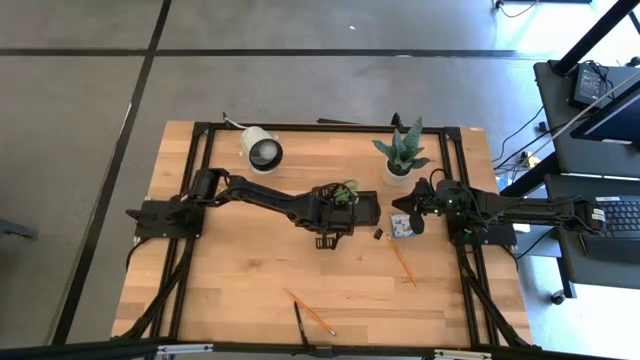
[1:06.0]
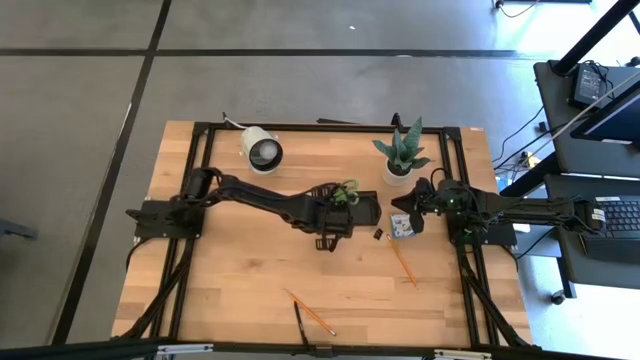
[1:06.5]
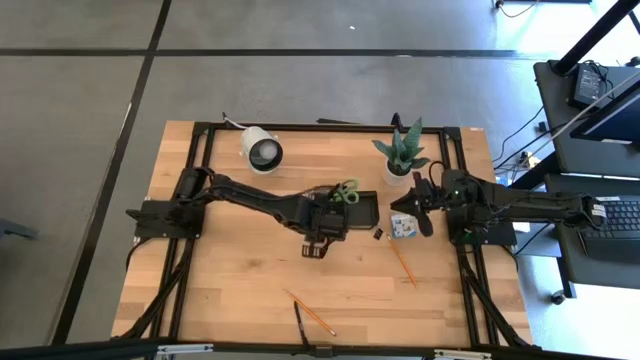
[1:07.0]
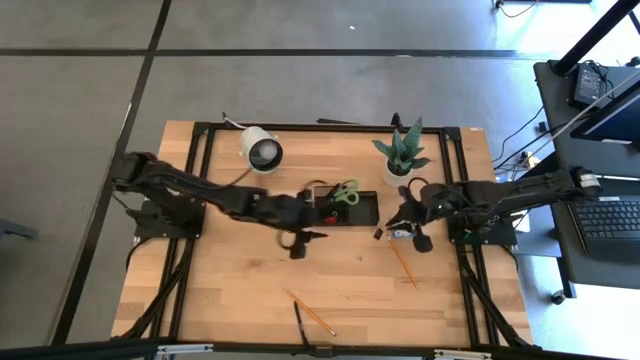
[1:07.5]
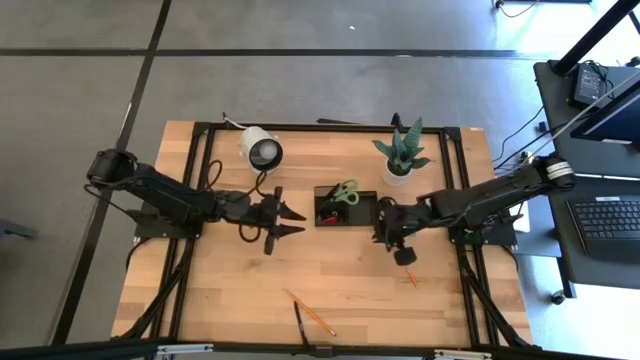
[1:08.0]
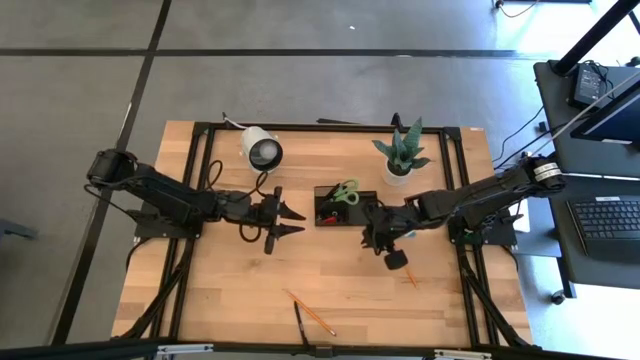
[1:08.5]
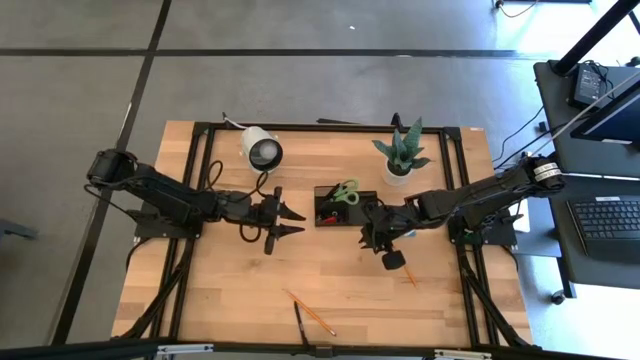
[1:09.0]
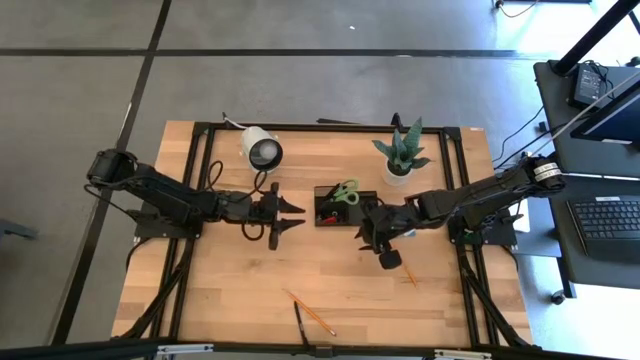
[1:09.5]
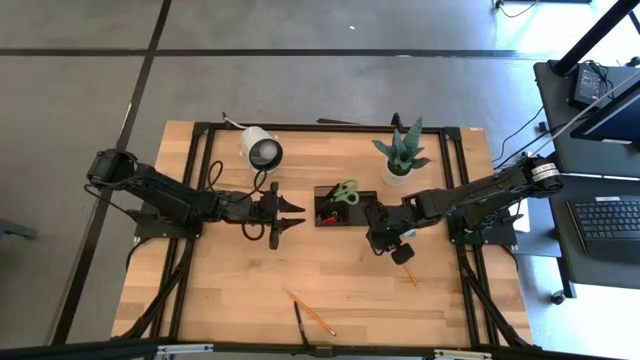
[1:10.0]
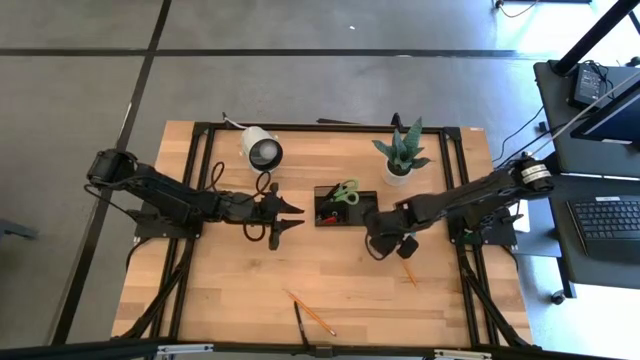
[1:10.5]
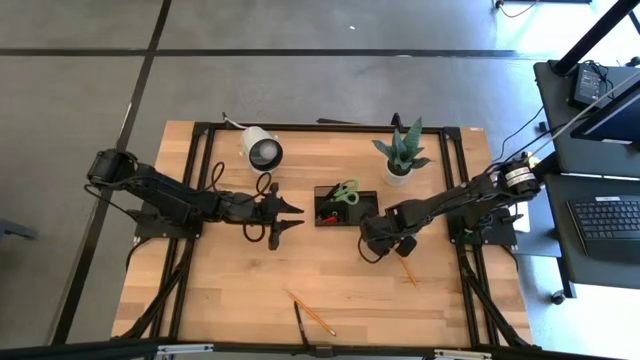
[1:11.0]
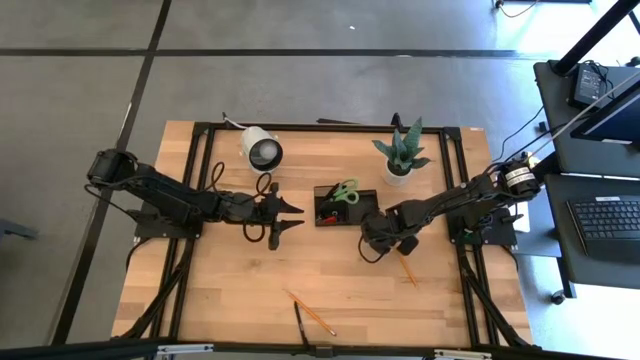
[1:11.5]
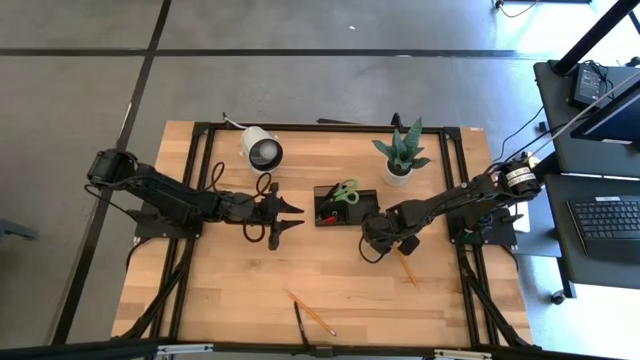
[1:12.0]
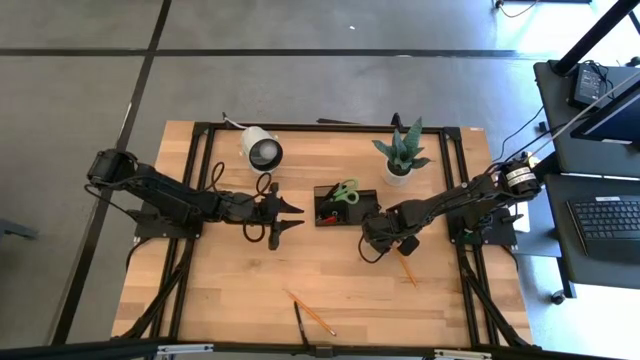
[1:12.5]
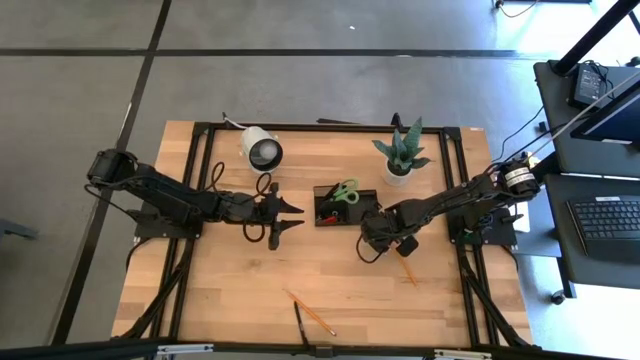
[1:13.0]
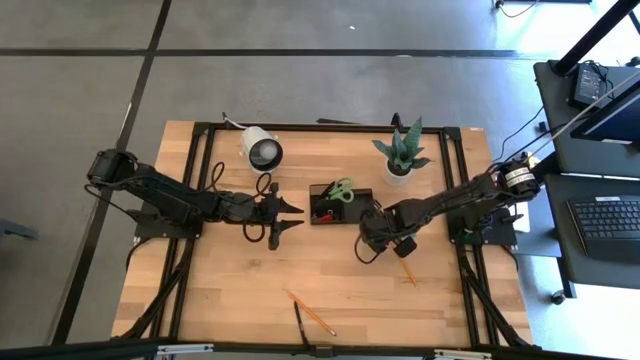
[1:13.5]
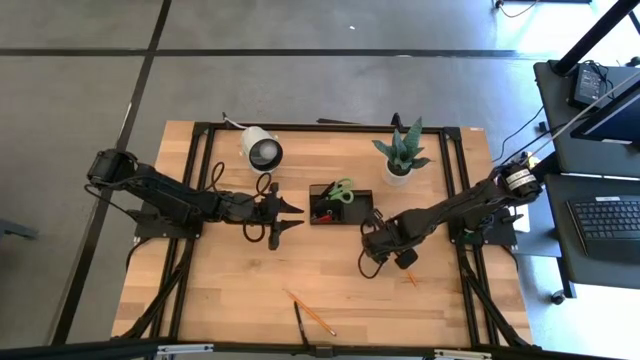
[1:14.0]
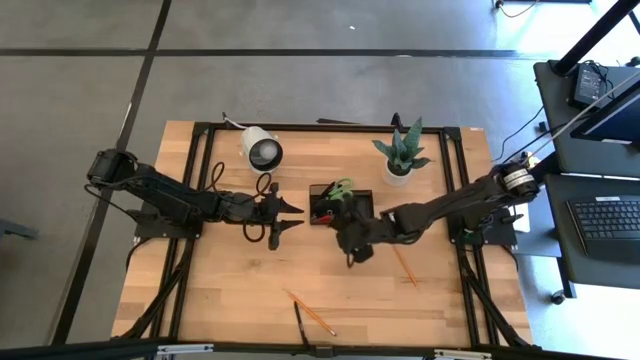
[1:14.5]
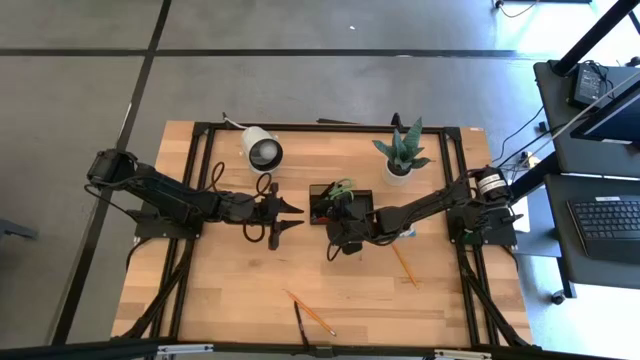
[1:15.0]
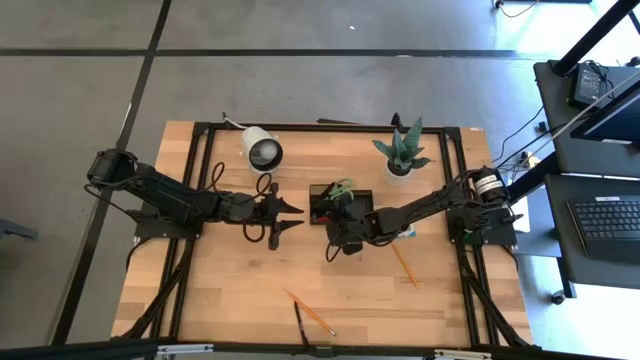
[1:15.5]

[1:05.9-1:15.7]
Task: Pick and place office supplies into organizer
Put the black binder clip in the desk organizer

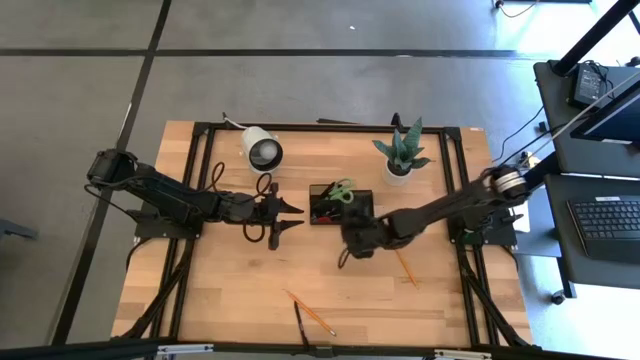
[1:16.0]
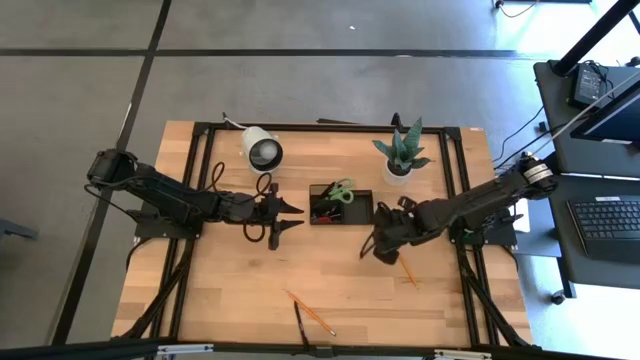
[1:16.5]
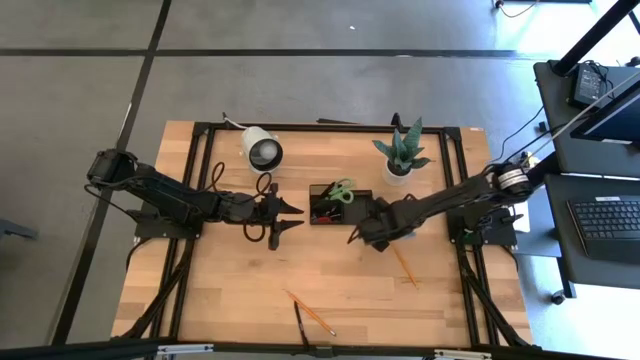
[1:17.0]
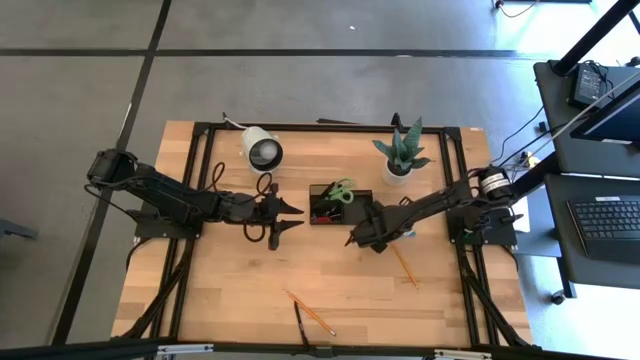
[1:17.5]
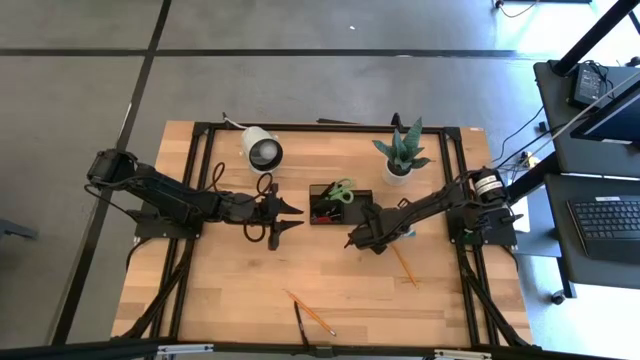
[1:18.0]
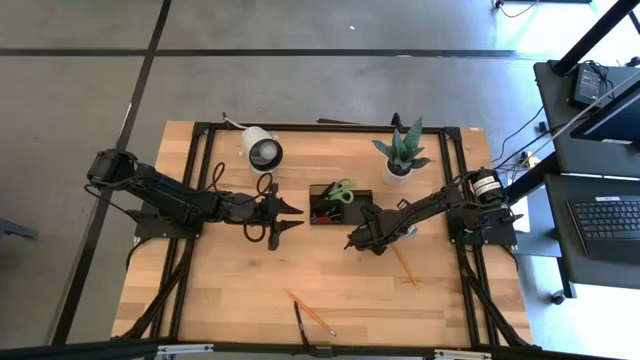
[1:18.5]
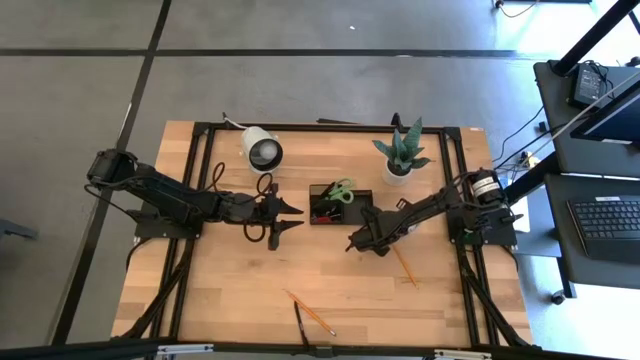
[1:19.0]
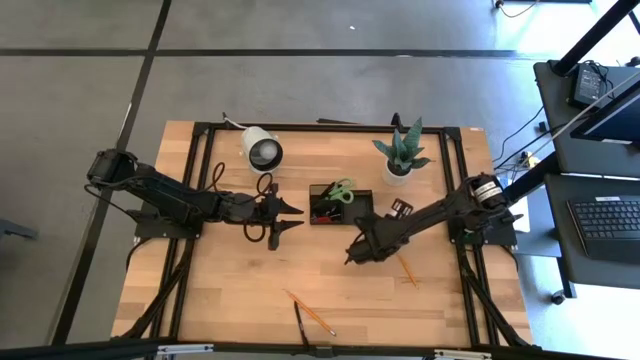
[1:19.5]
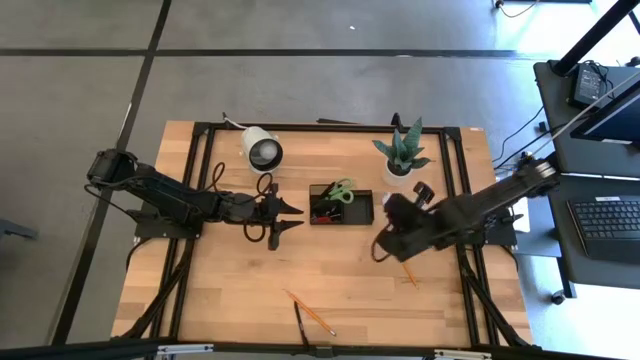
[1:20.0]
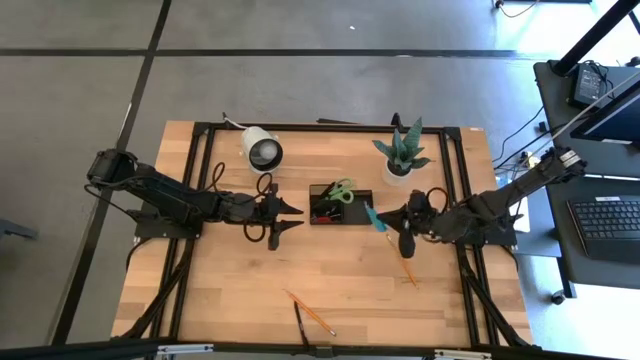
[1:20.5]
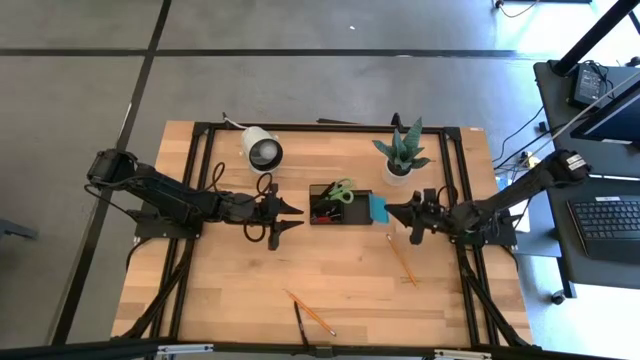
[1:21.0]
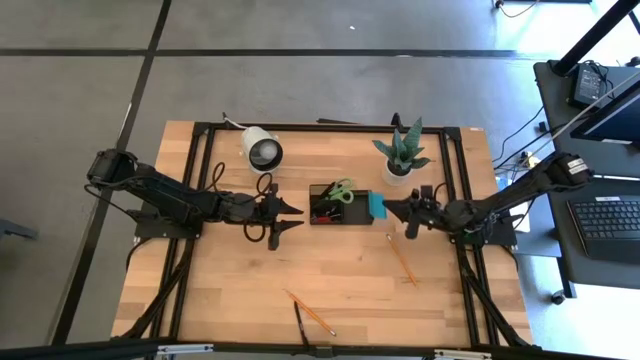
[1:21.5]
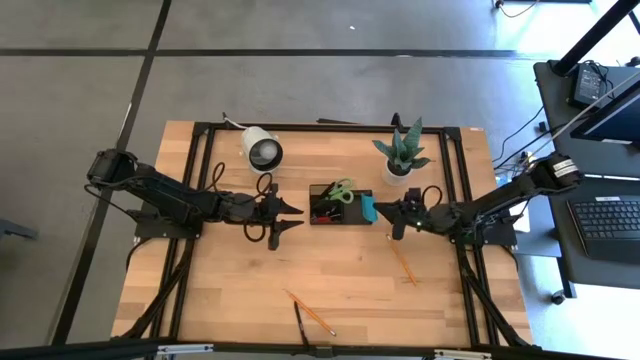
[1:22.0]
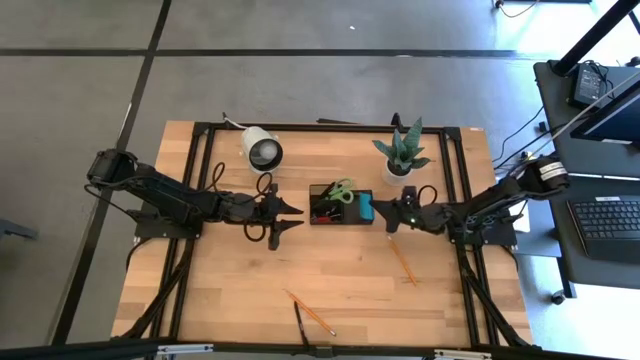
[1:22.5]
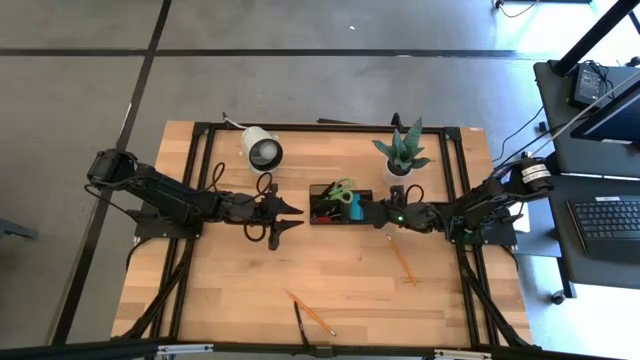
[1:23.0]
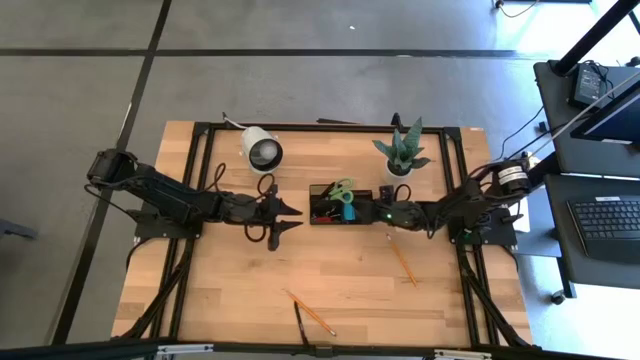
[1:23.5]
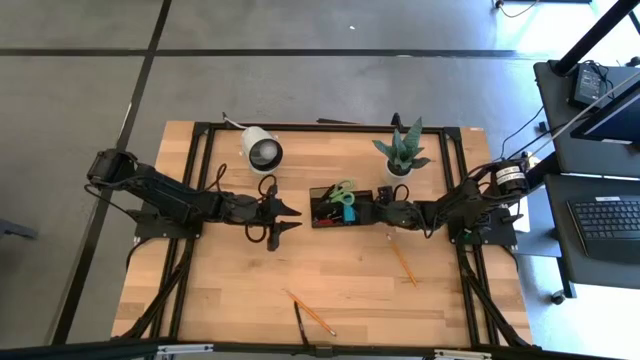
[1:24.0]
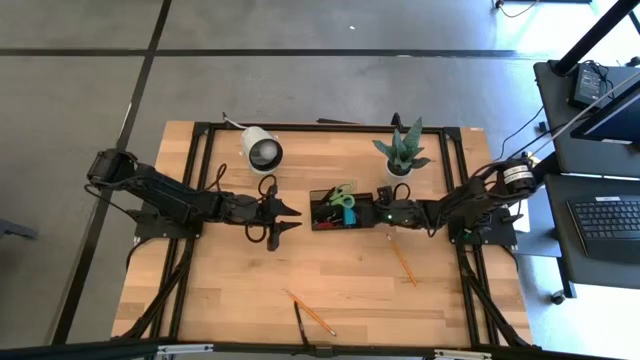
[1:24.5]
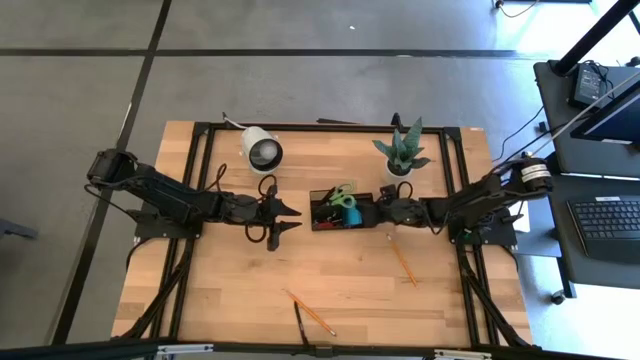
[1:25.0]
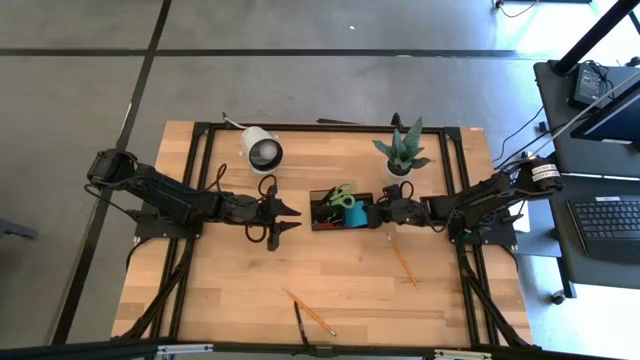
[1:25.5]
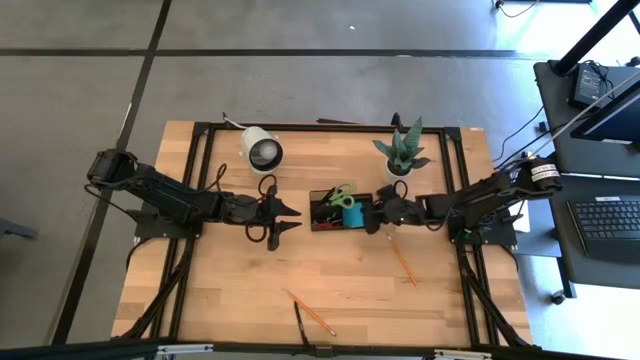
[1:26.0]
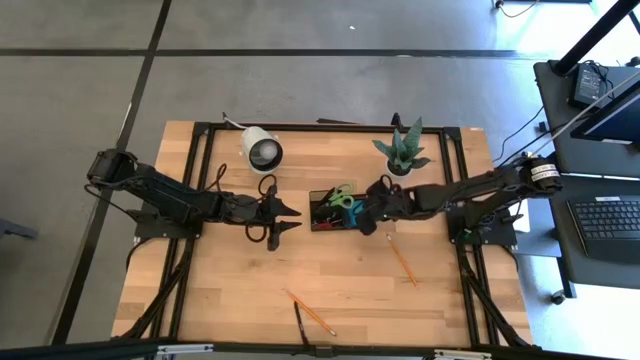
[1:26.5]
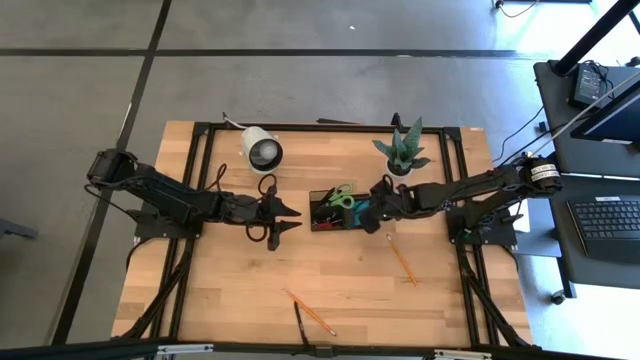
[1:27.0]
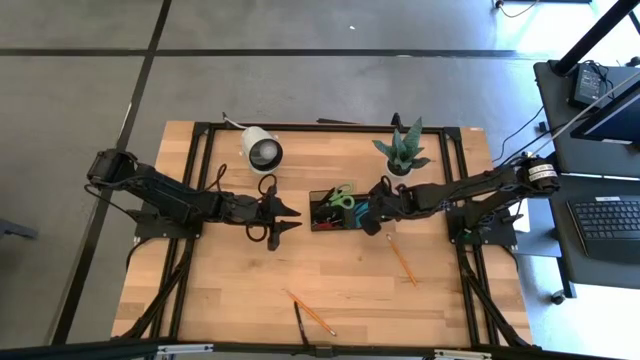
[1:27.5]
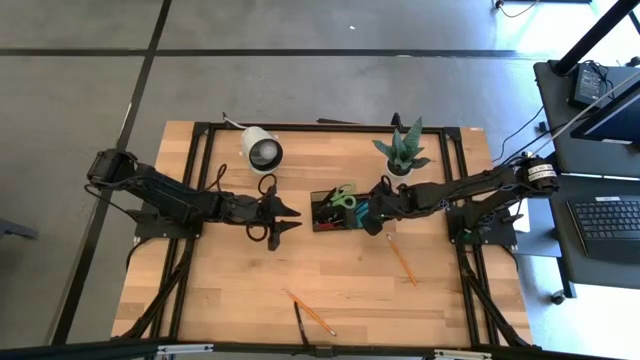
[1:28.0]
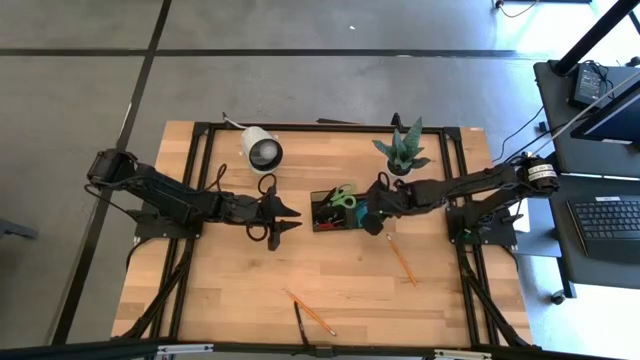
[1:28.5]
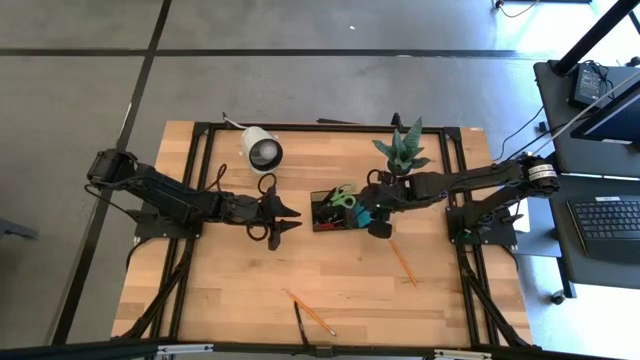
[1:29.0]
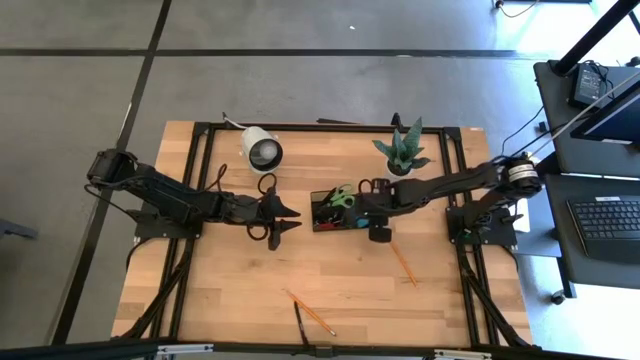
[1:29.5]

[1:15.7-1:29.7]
Put the blue sticky notes in the desk organizer
